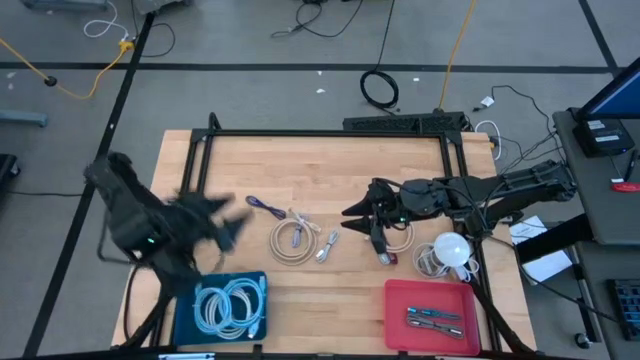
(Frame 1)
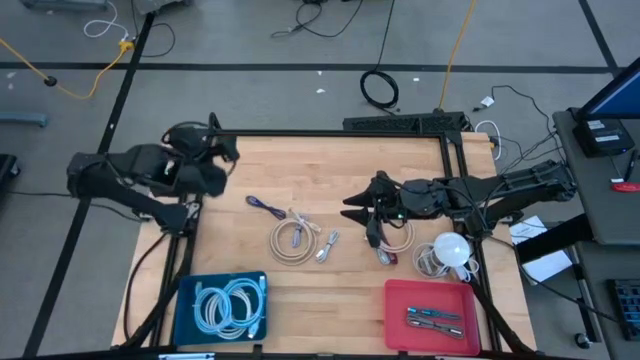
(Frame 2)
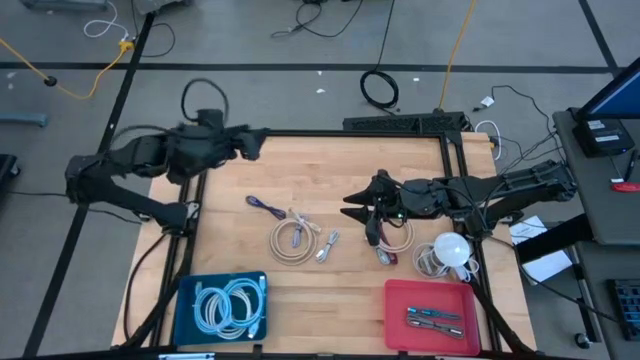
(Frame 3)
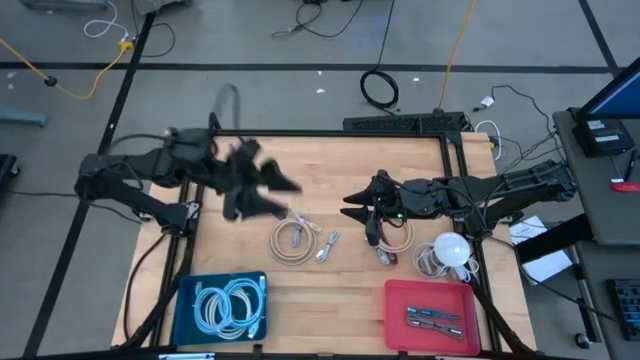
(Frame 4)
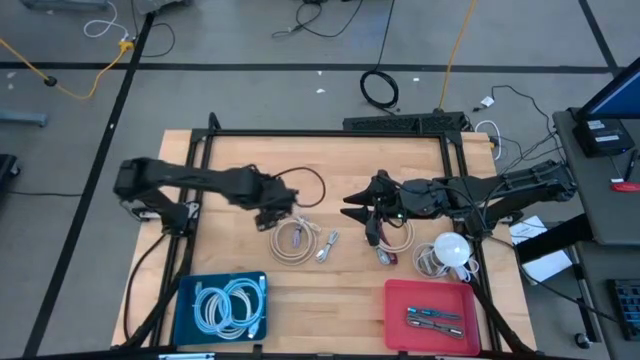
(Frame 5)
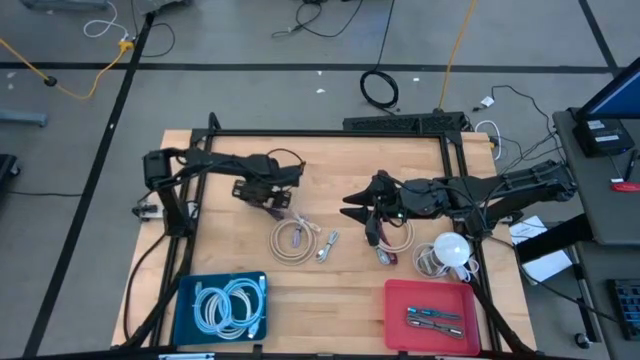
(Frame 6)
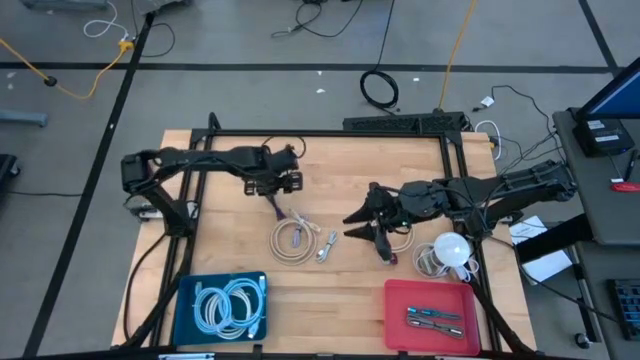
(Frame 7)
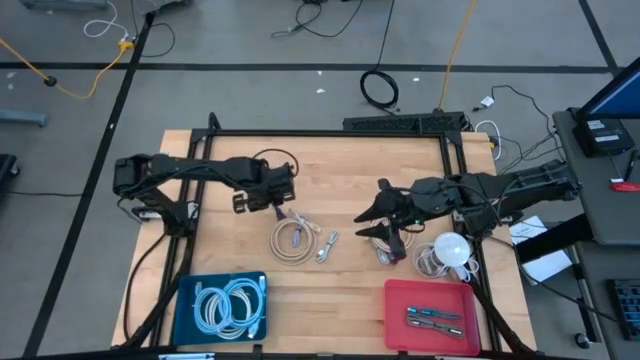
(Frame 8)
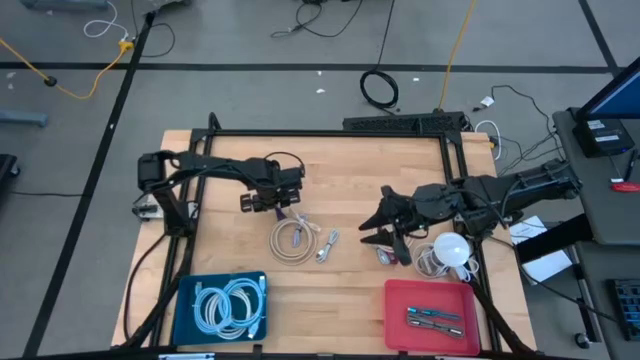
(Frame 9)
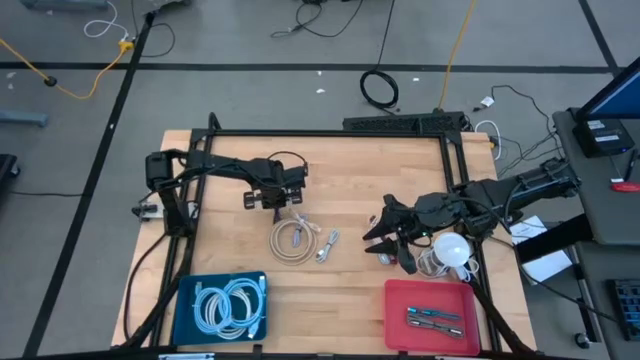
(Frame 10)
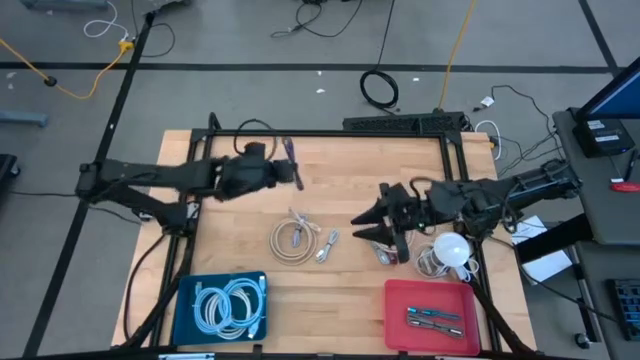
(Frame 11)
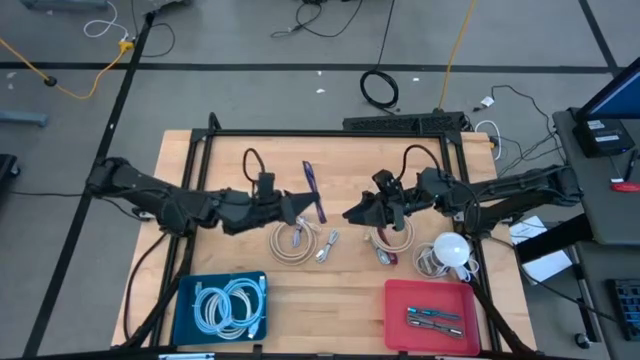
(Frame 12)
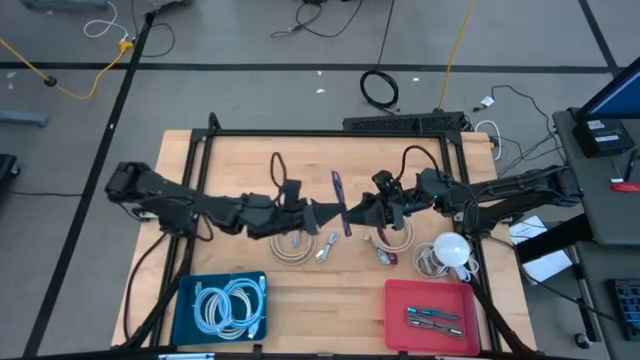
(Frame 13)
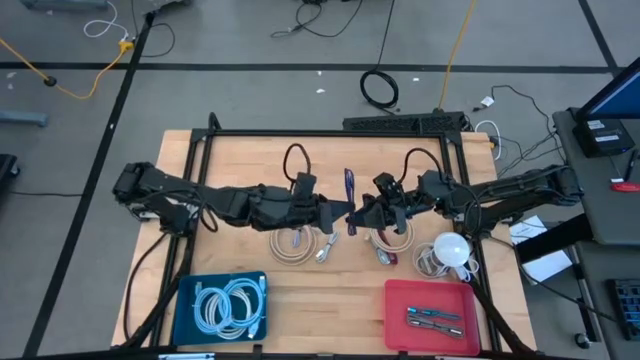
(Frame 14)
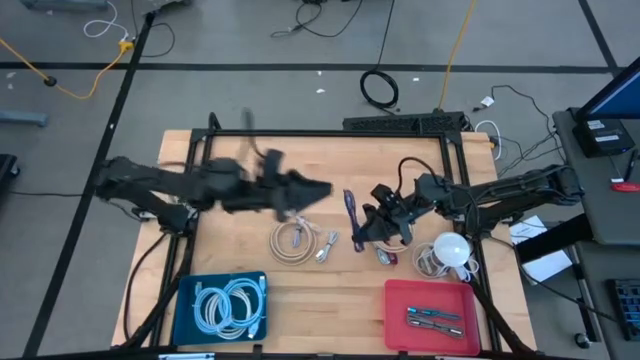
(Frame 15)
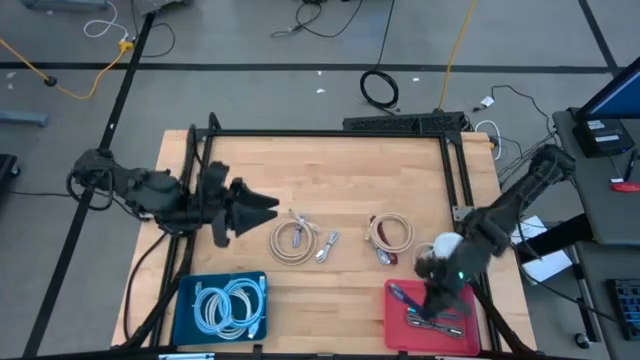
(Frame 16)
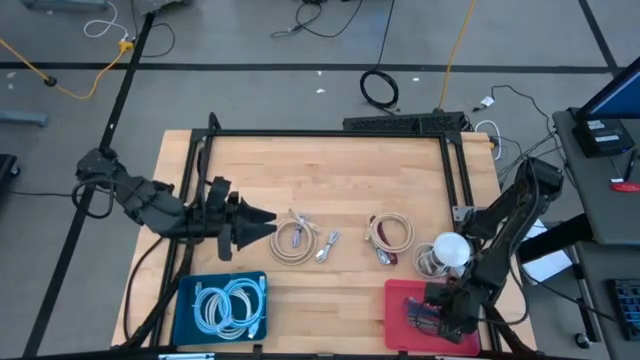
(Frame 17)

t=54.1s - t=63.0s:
Task: Pick & Place USB Port
Put the dark blue charger cable into the pink bin

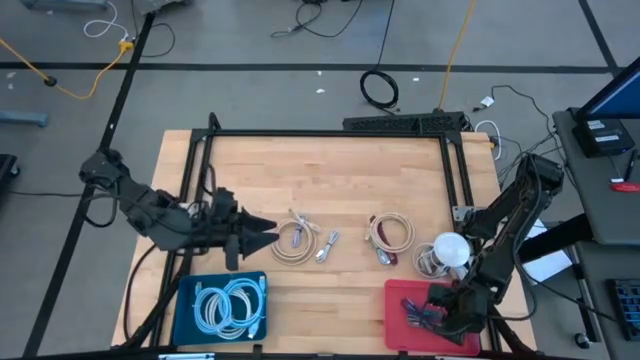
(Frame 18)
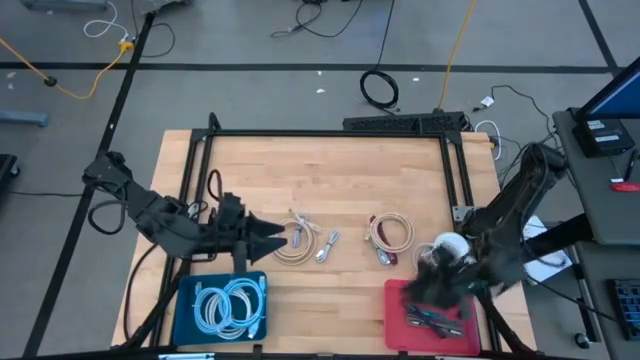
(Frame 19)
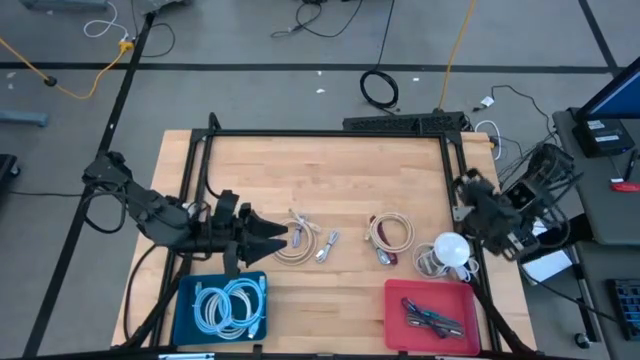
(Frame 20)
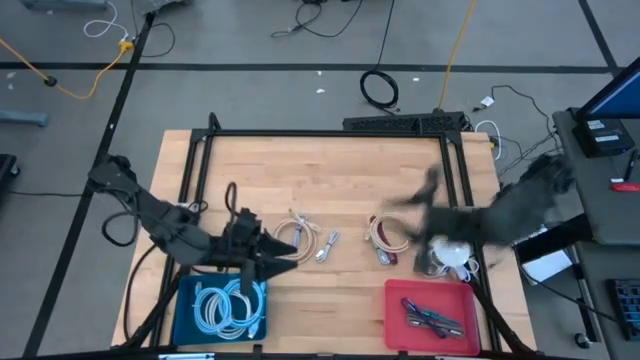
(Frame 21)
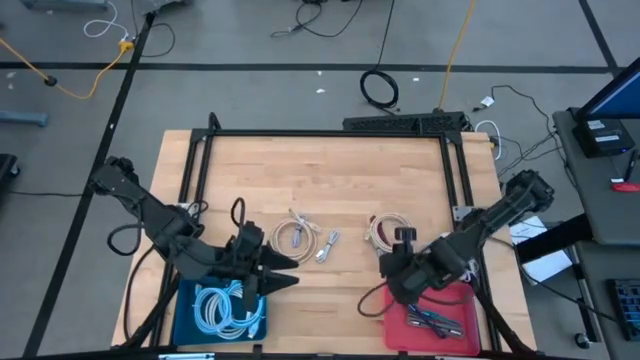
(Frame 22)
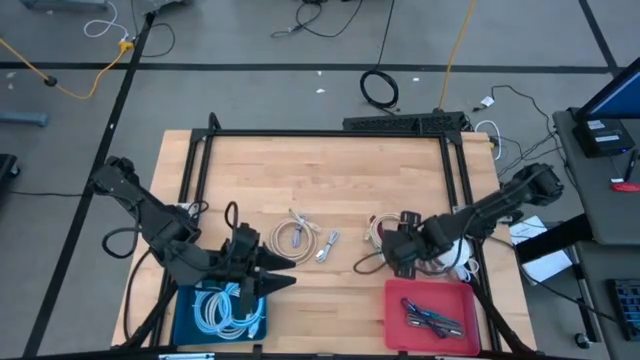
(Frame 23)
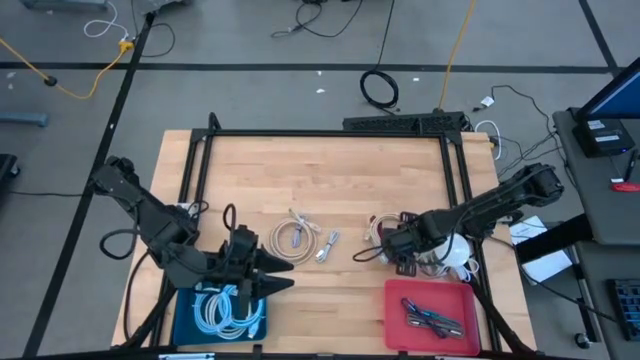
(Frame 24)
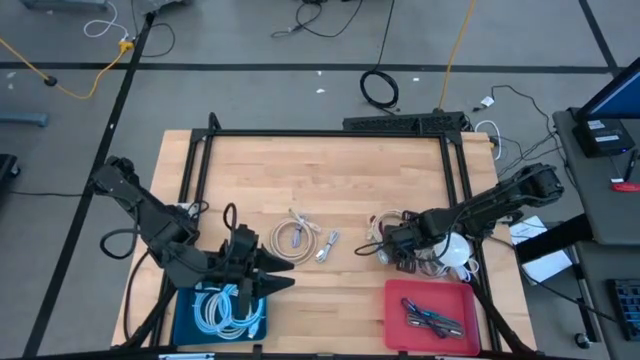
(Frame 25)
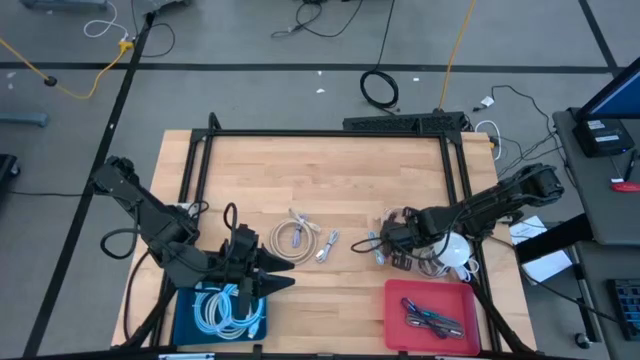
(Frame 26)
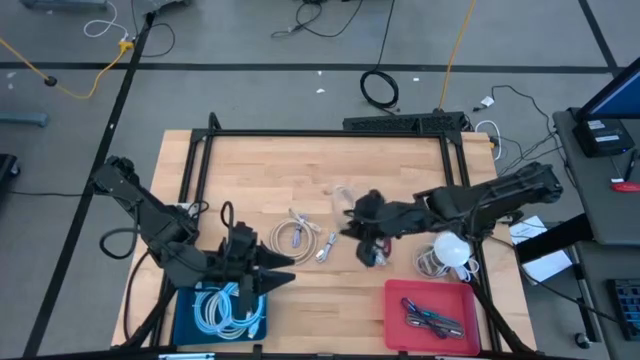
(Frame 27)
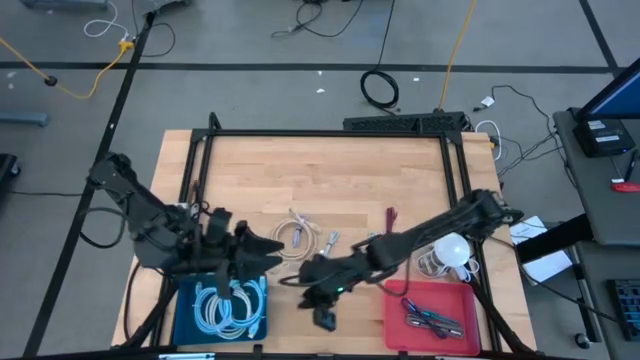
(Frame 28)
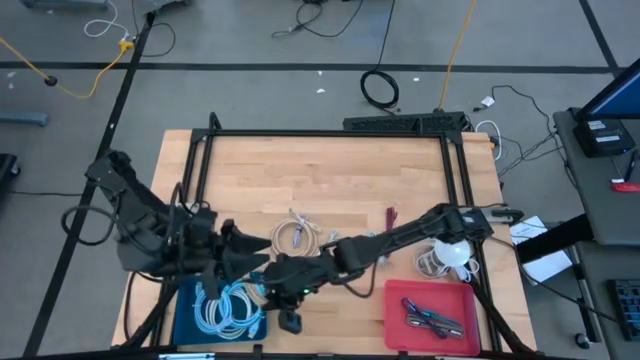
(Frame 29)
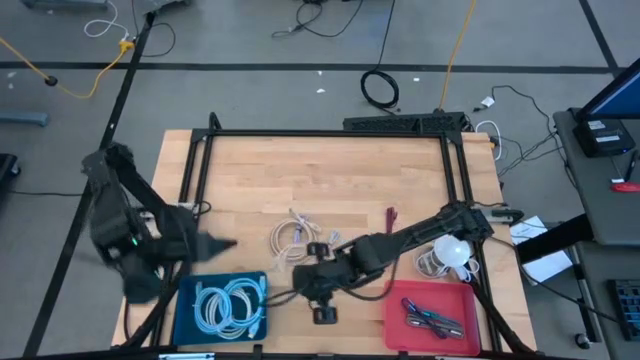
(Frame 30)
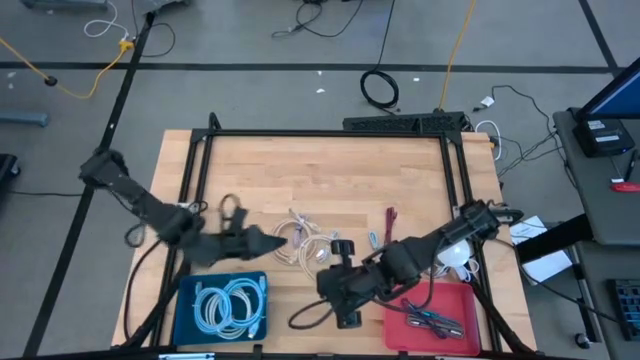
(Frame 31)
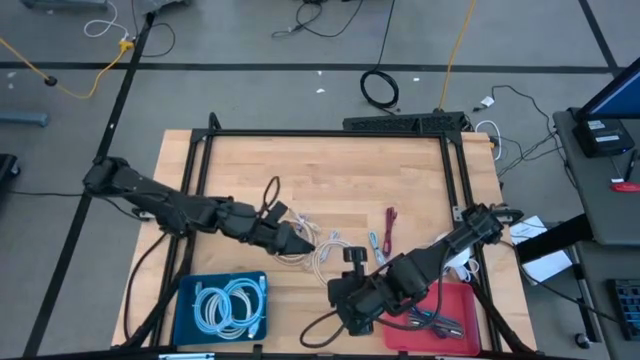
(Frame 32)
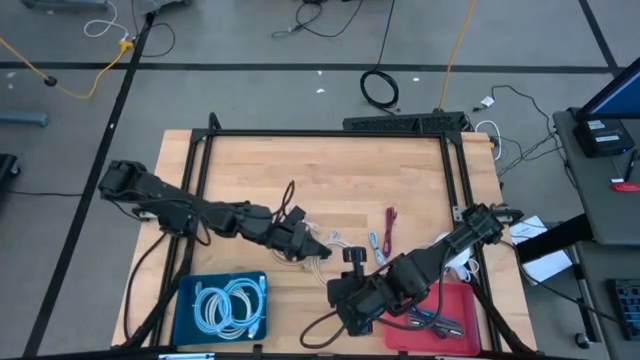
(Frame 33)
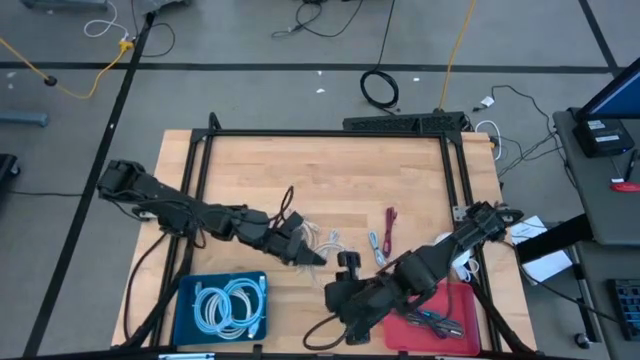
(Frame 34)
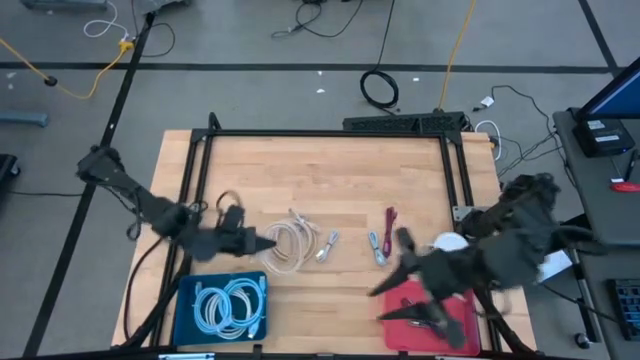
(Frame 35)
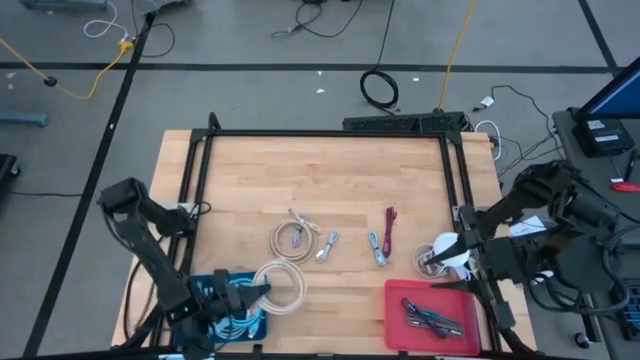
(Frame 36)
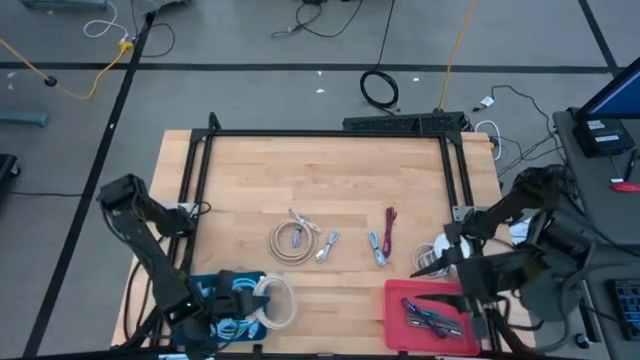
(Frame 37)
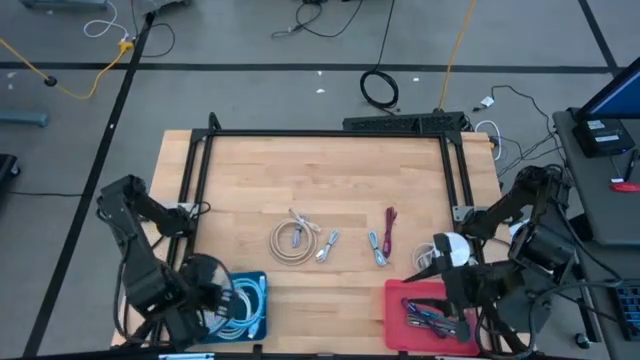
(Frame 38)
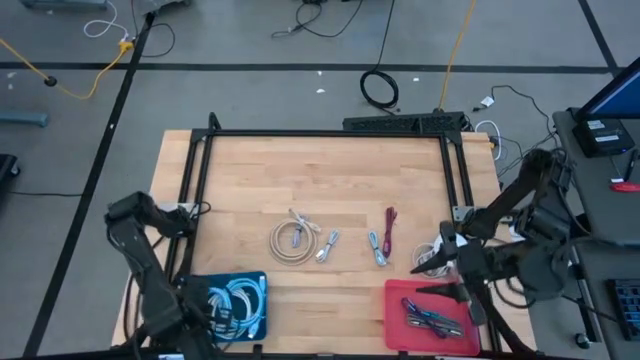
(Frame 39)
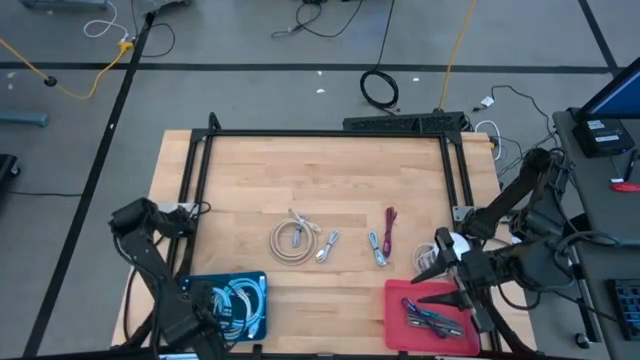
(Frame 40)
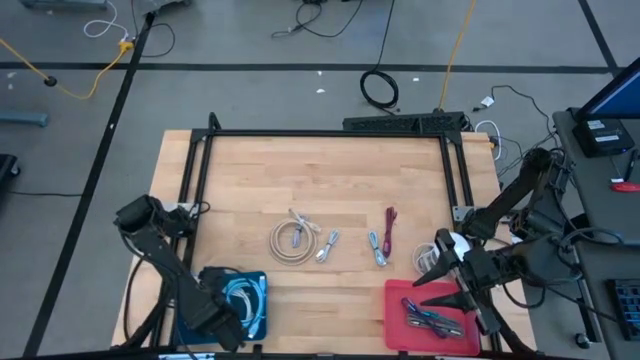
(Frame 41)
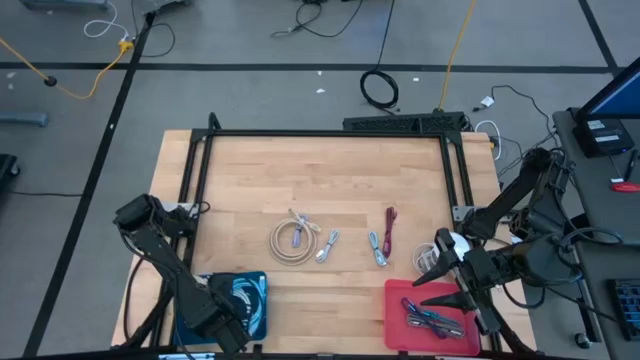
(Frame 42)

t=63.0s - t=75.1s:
Put the right light brown HDMI cable into the blue bin
